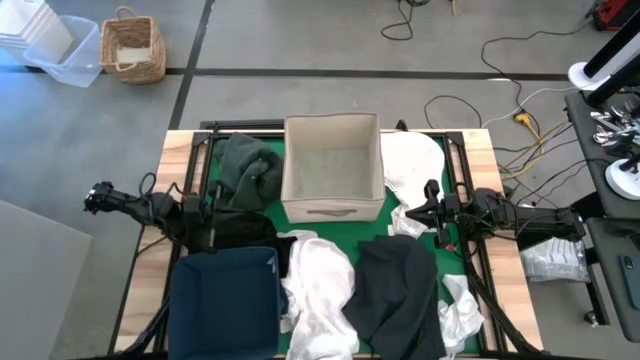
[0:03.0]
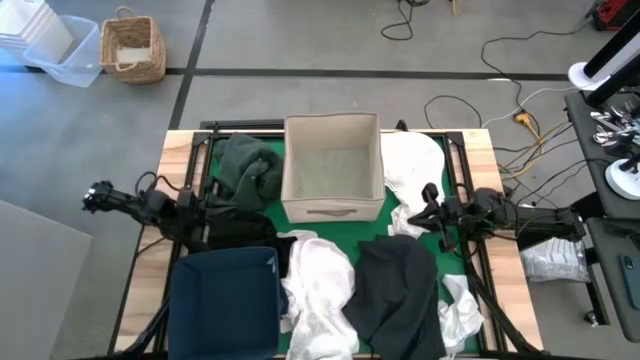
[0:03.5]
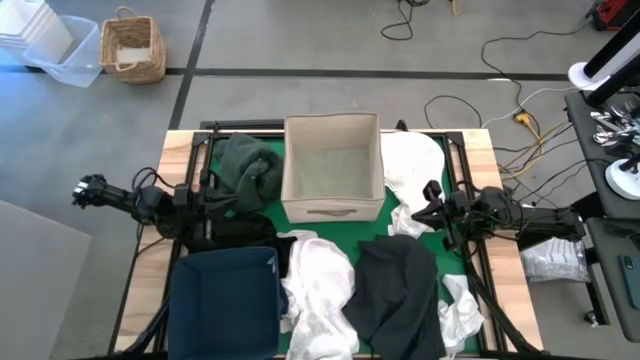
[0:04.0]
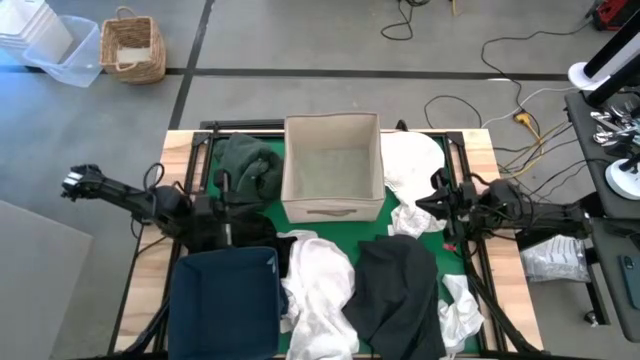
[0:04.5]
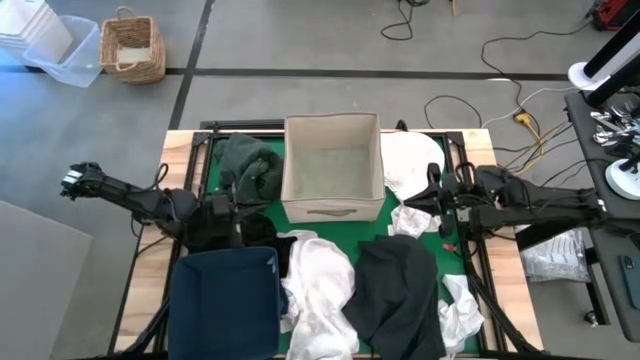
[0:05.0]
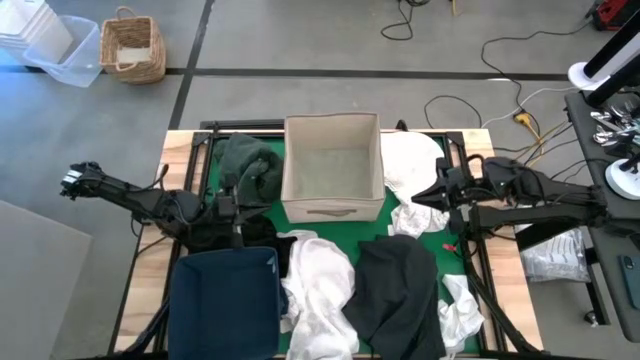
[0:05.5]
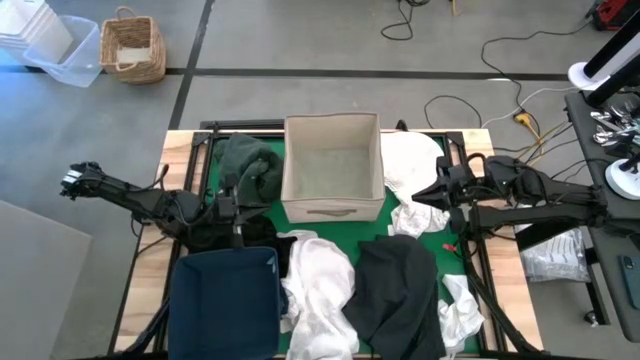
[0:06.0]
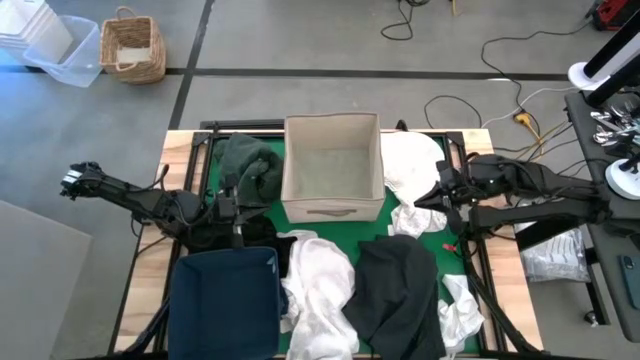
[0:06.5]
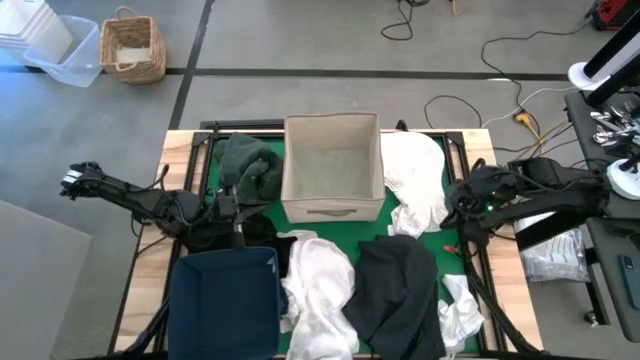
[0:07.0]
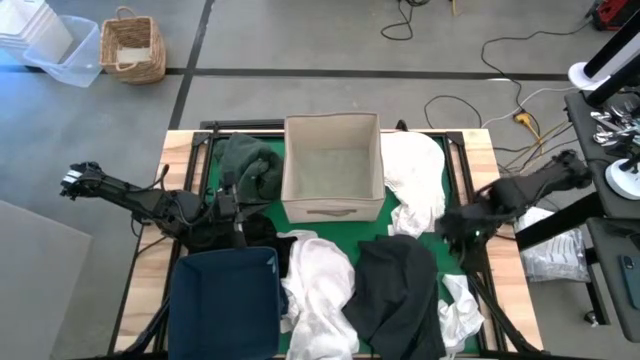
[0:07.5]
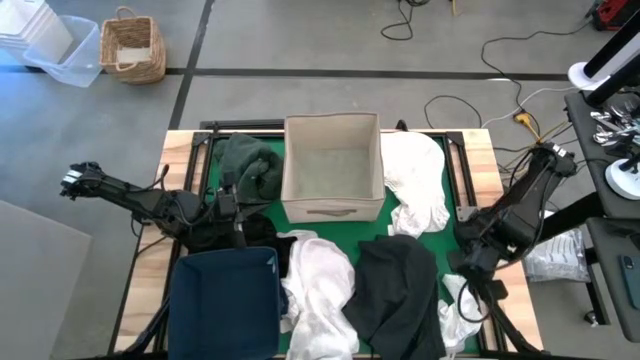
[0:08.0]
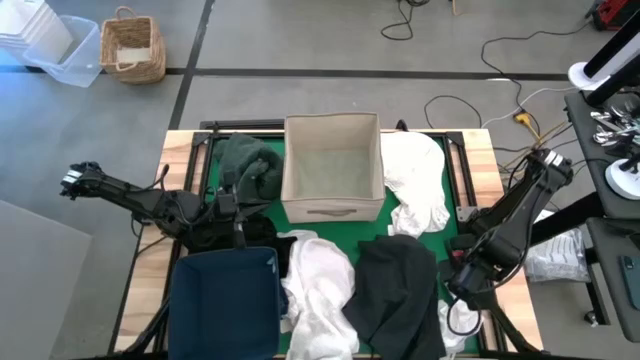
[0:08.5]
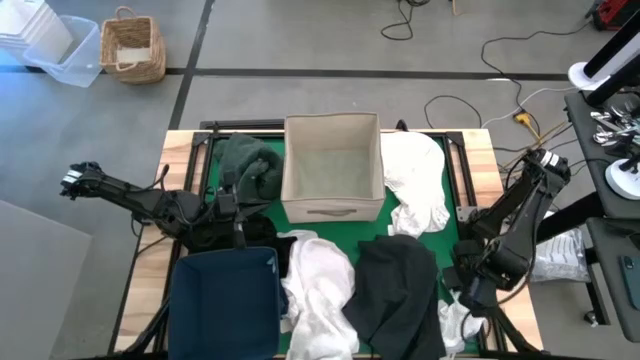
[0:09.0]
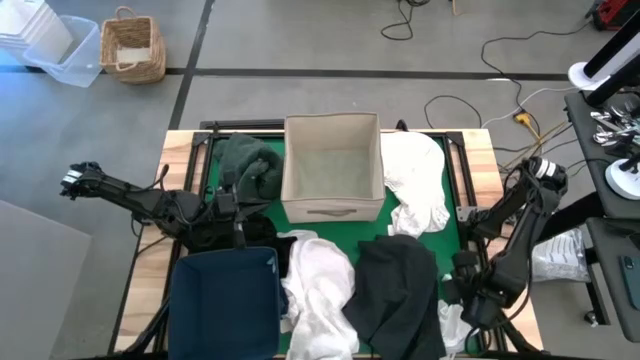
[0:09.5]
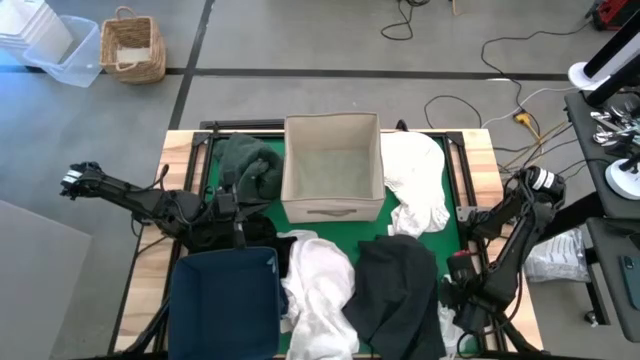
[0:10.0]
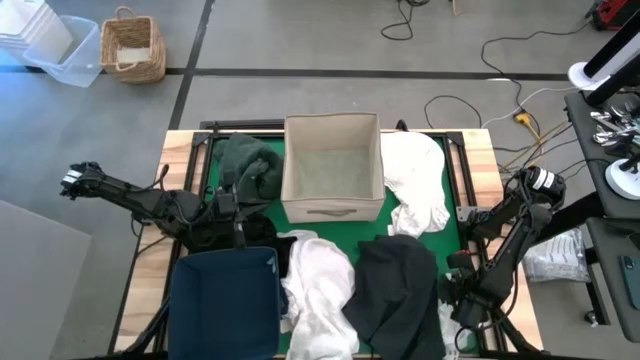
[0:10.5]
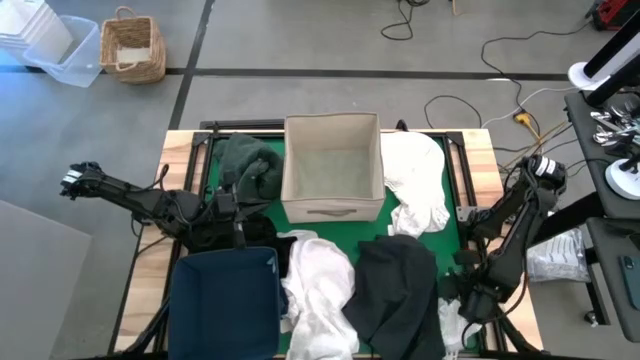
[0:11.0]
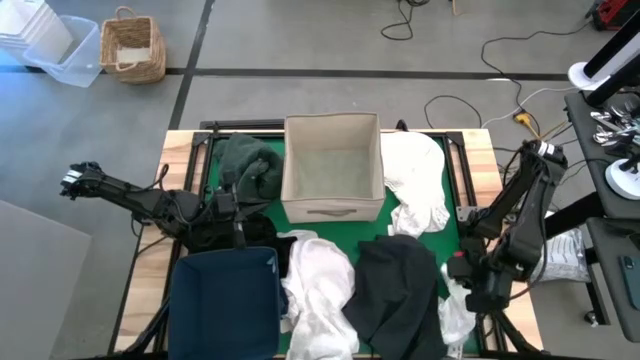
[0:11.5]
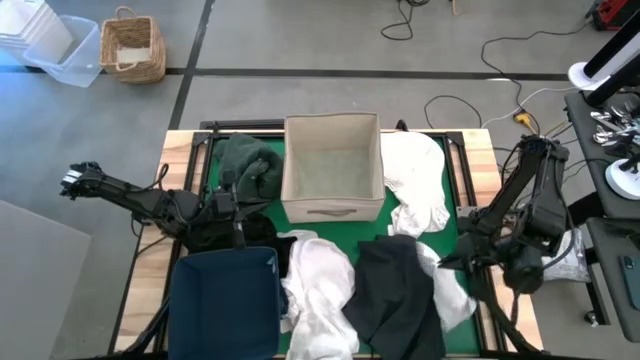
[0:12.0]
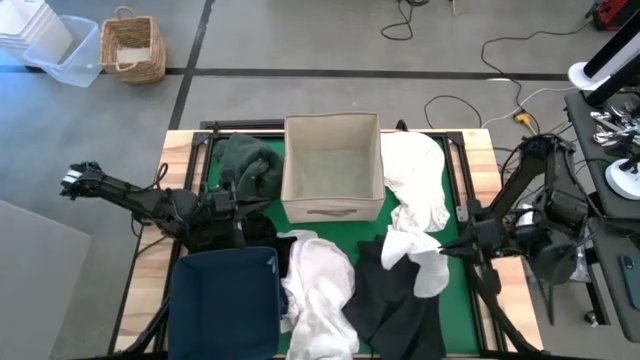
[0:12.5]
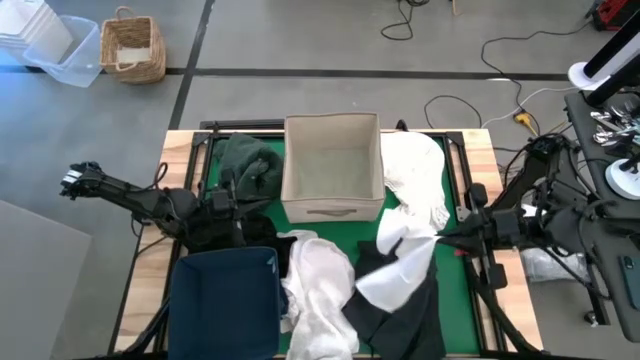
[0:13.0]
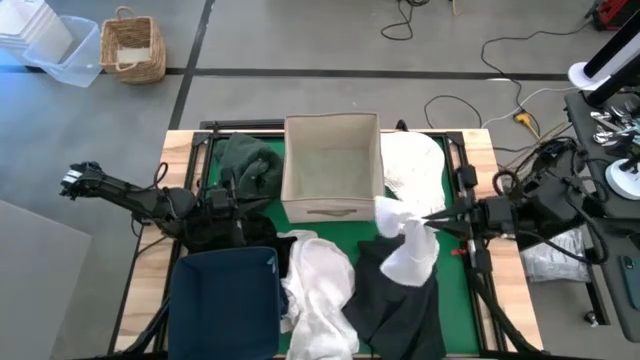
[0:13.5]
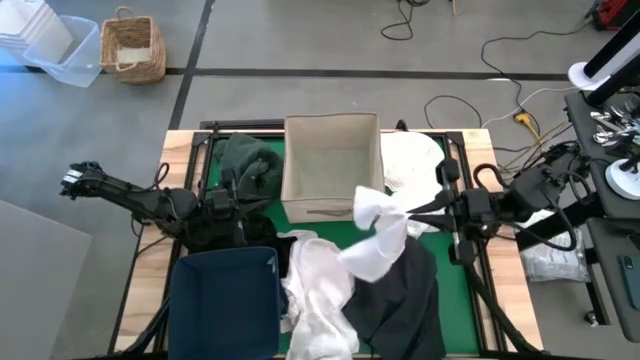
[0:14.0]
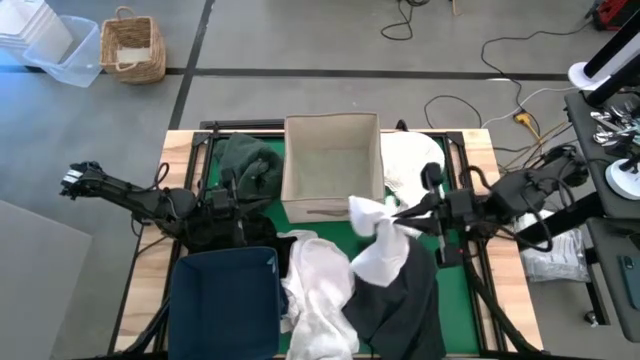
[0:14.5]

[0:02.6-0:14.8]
Put the left white cloth into the blue laundry bin

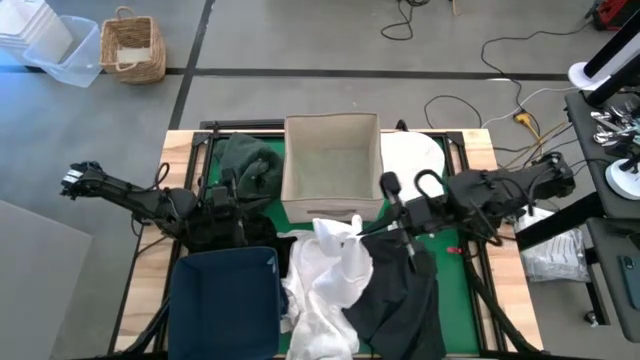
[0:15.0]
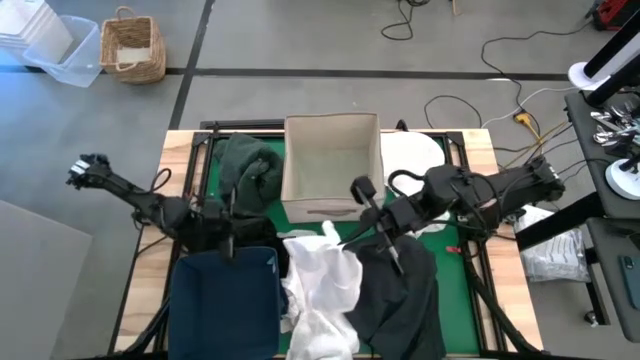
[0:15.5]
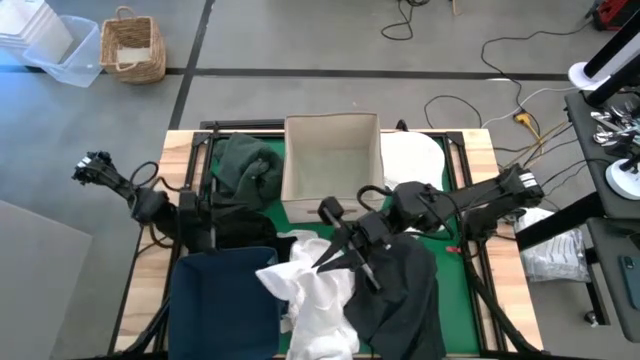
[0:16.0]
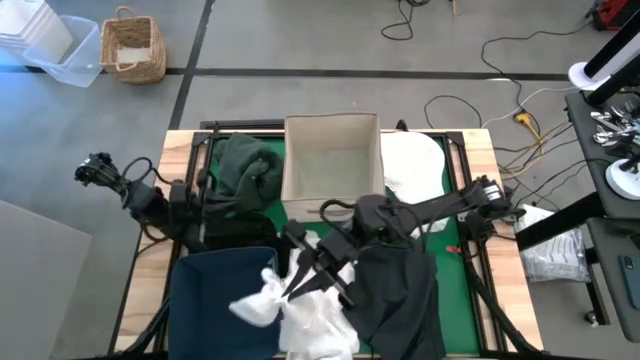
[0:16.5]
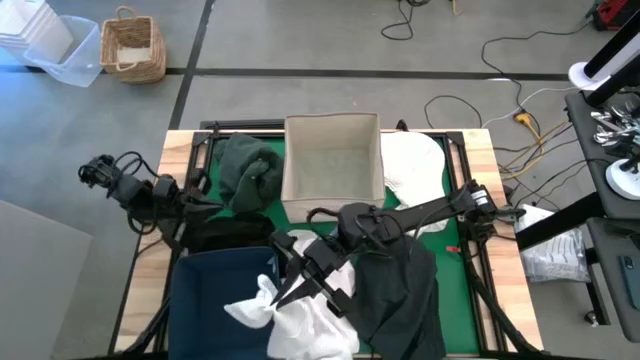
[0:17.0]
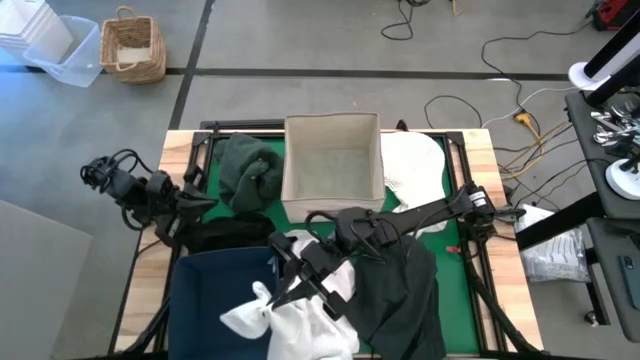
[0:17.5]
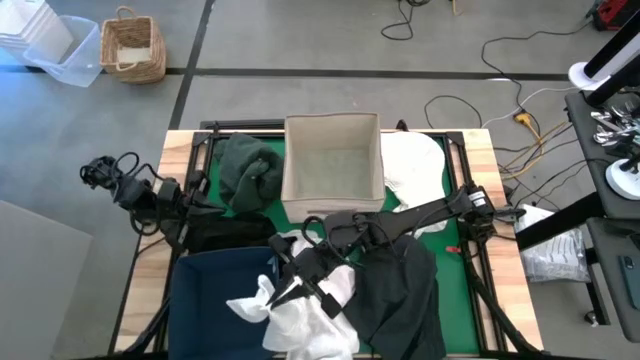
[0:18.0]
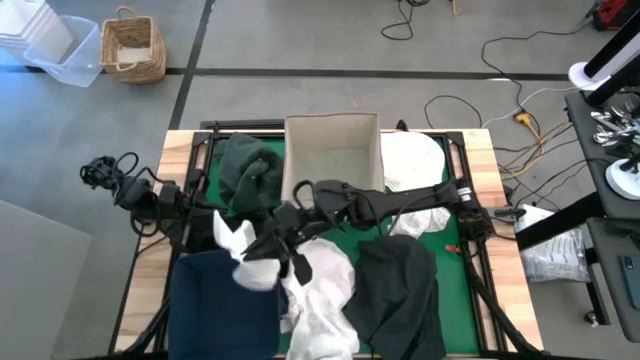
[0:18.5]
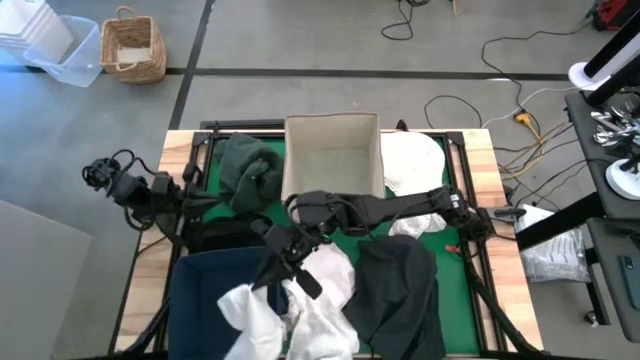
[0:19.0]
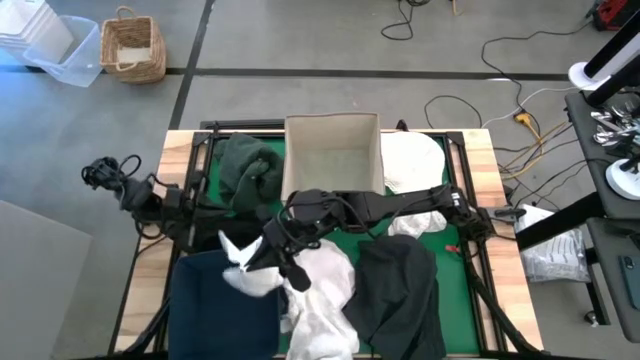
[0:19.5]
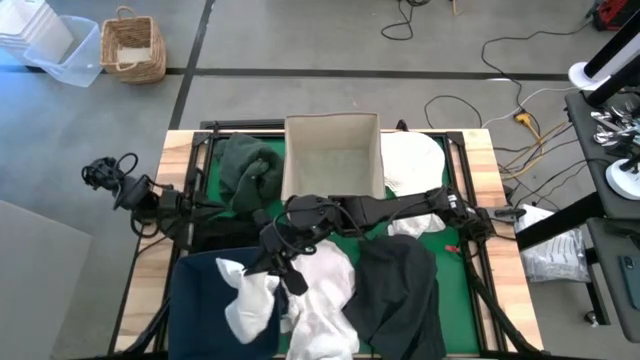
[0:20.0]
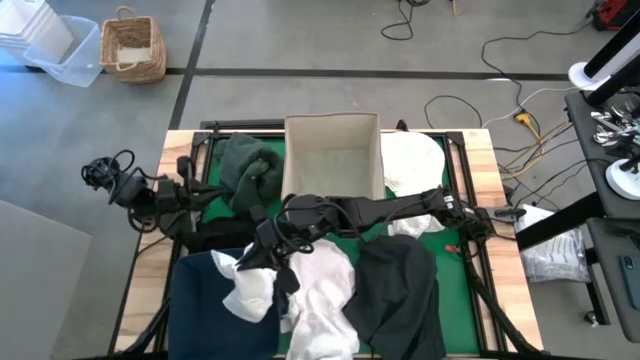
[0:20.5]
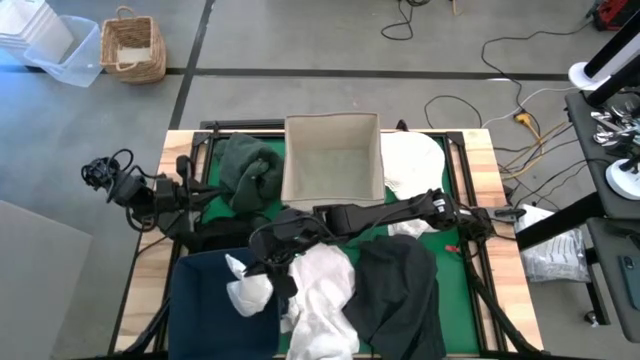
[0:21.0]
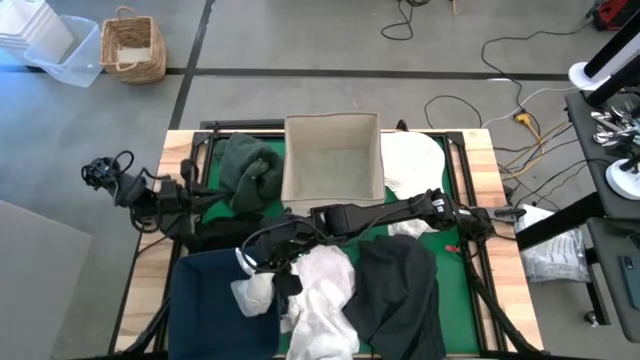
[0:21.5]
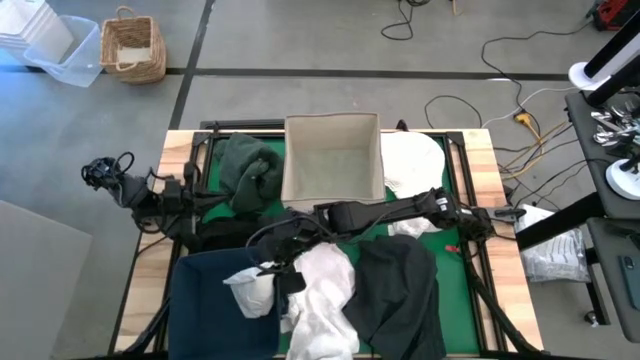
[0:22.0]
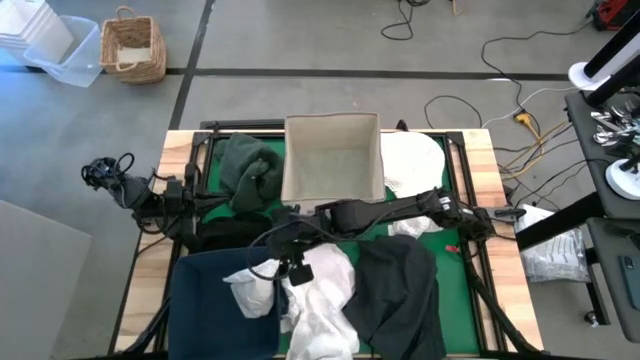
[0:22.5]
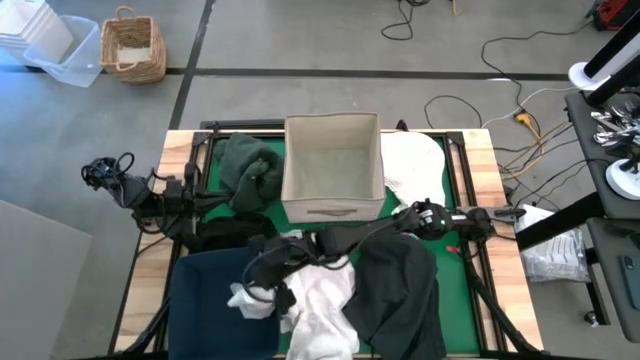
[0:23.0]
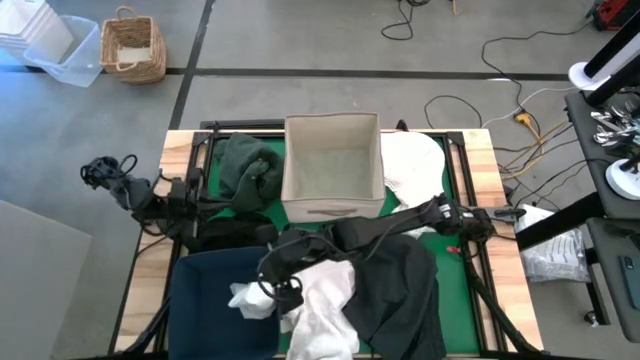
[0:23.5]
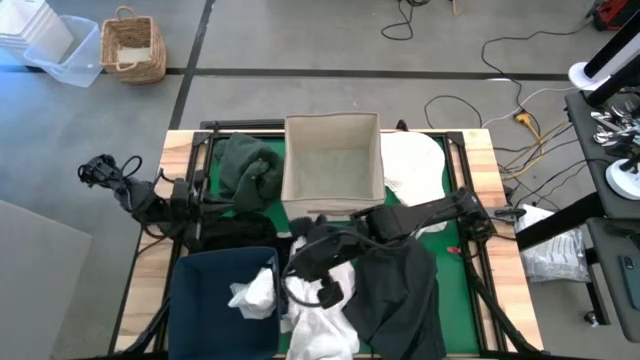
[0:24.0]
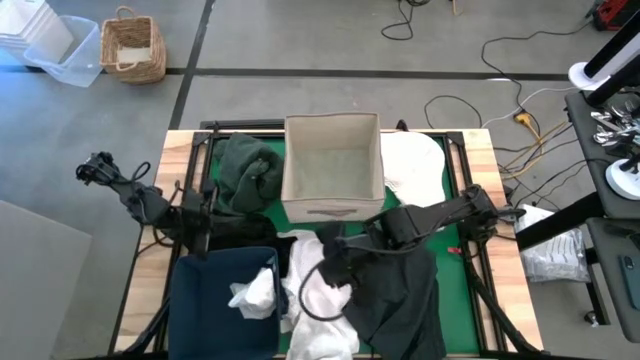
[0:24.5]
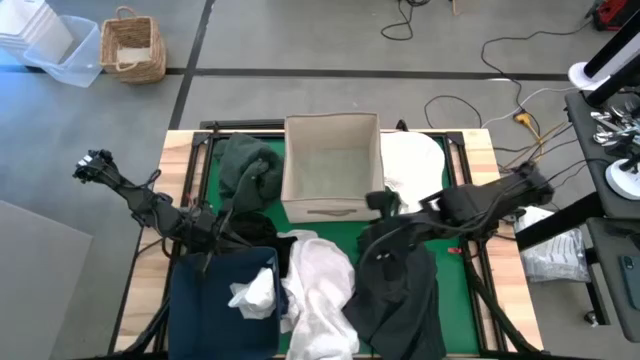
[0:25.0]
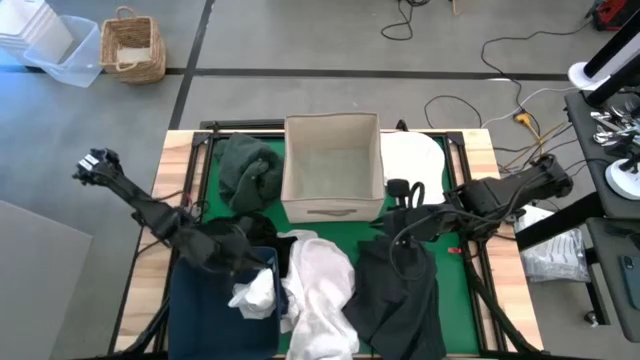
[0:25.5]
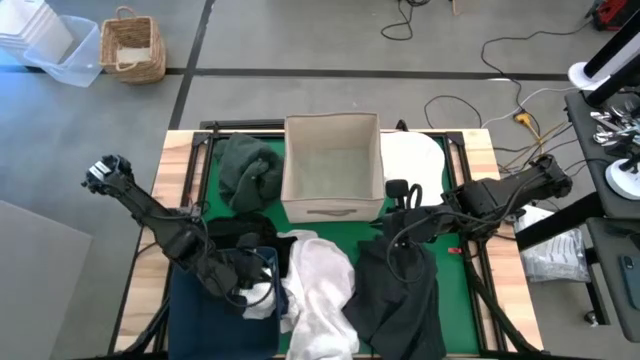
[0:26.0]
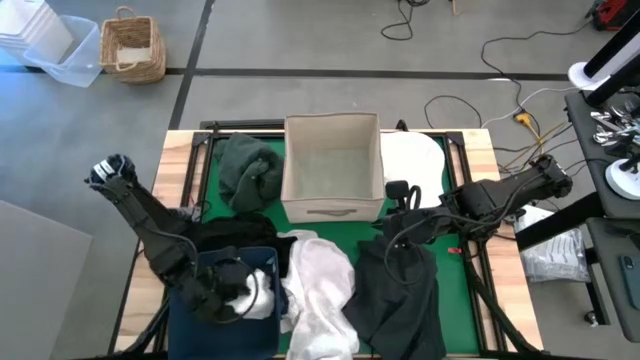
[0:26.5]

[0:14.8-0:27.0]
Put the left white cloth into the blue laundry bin
